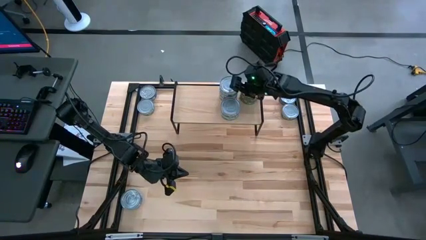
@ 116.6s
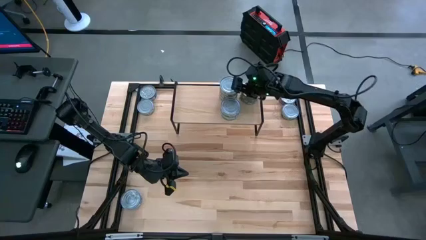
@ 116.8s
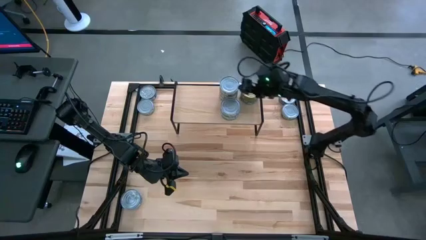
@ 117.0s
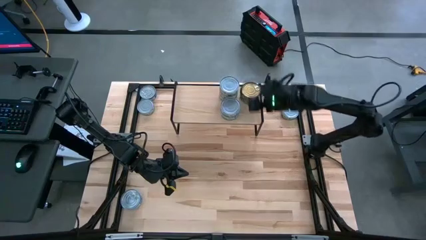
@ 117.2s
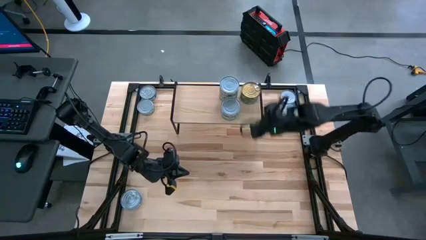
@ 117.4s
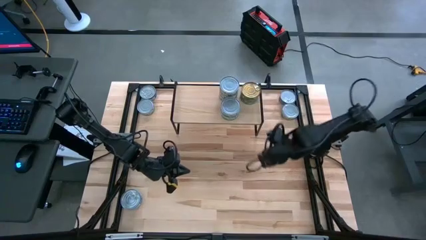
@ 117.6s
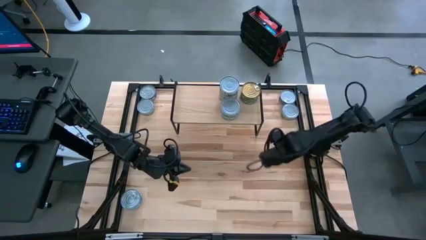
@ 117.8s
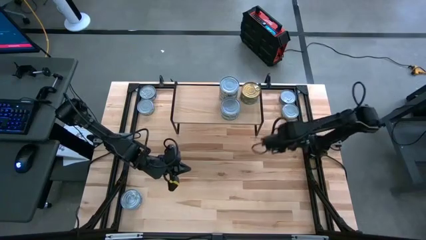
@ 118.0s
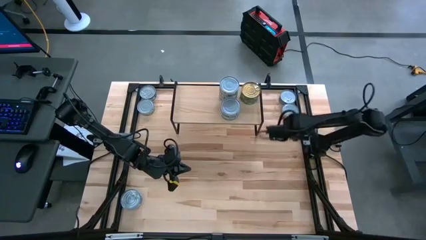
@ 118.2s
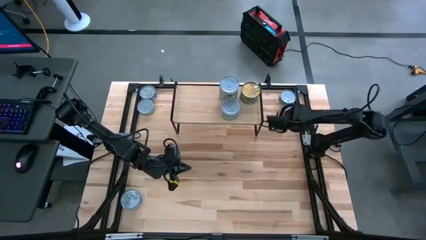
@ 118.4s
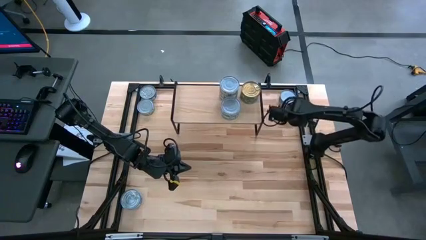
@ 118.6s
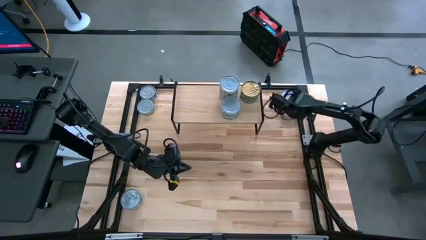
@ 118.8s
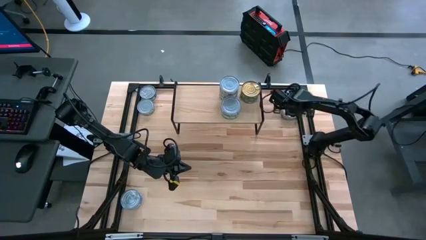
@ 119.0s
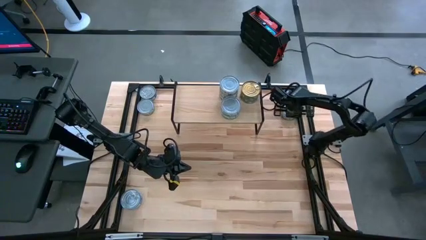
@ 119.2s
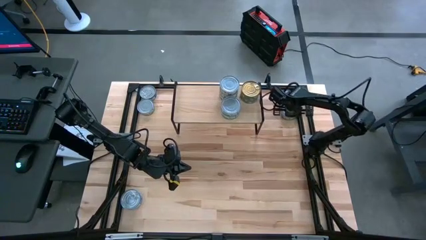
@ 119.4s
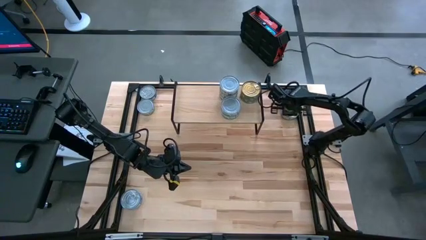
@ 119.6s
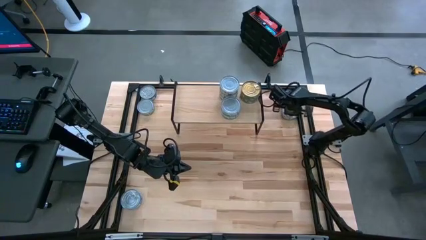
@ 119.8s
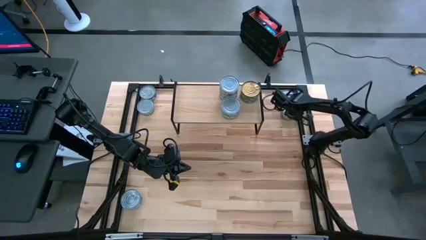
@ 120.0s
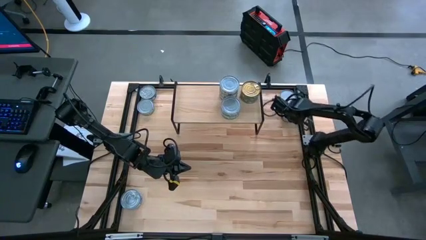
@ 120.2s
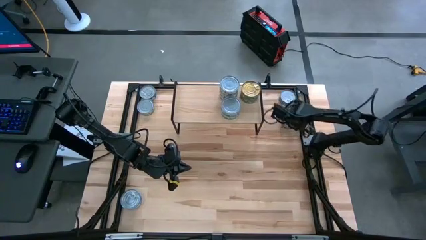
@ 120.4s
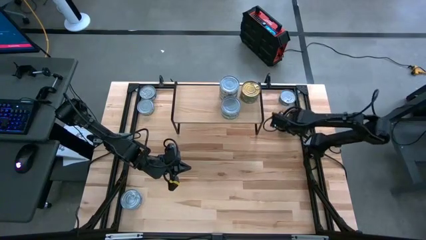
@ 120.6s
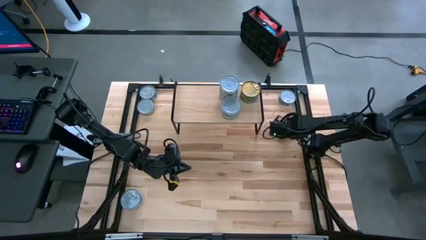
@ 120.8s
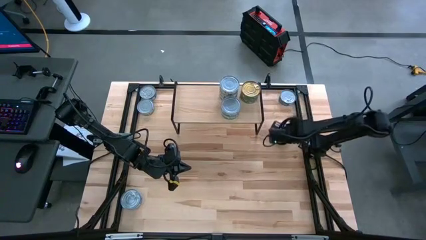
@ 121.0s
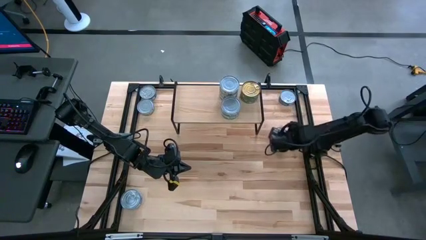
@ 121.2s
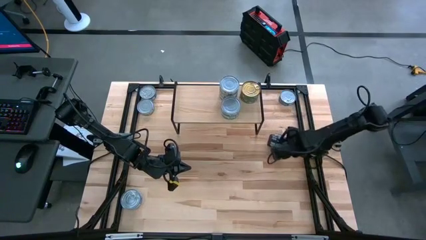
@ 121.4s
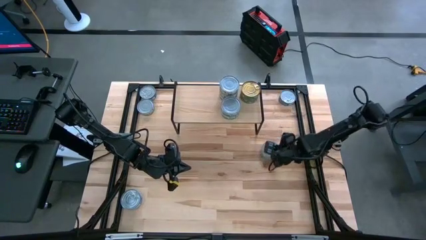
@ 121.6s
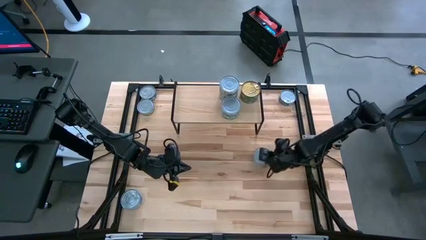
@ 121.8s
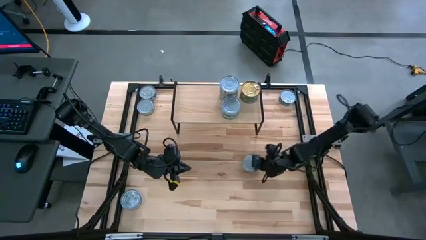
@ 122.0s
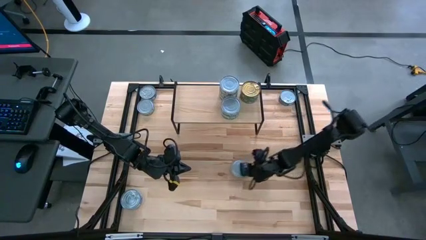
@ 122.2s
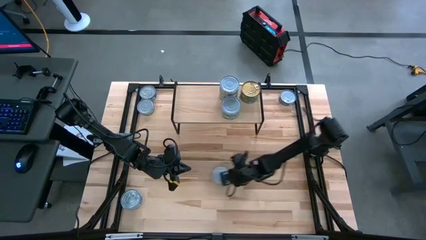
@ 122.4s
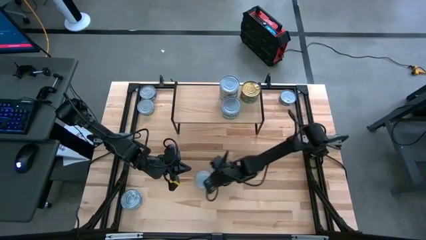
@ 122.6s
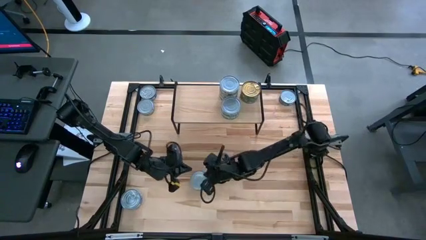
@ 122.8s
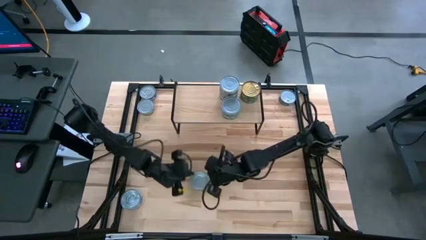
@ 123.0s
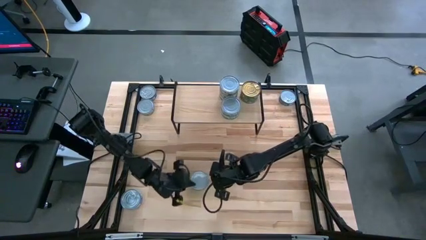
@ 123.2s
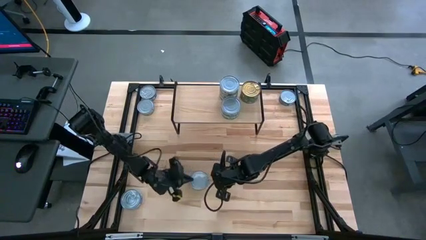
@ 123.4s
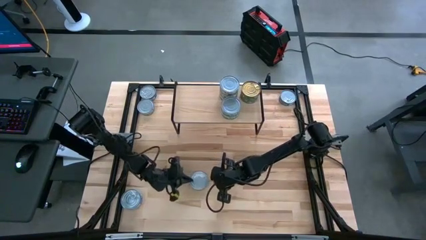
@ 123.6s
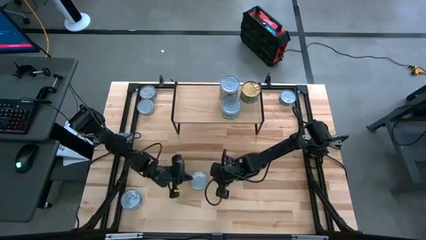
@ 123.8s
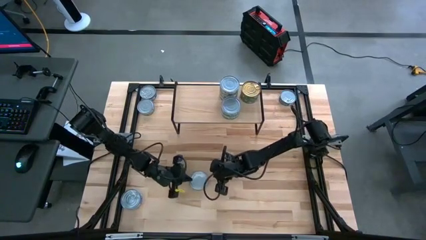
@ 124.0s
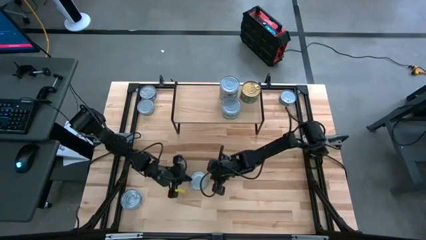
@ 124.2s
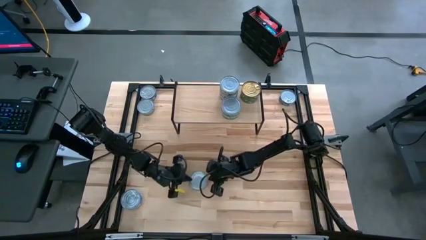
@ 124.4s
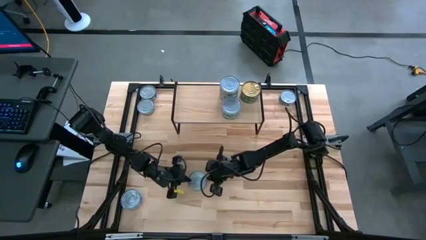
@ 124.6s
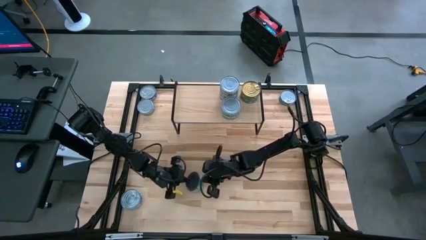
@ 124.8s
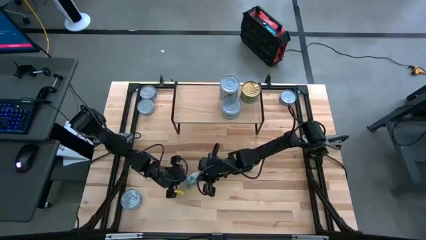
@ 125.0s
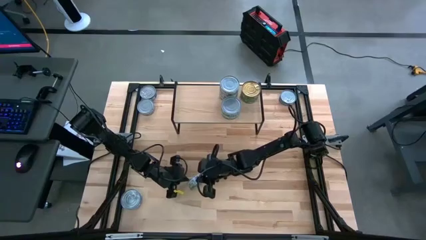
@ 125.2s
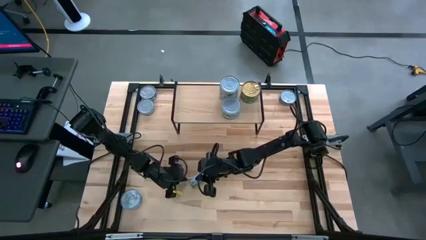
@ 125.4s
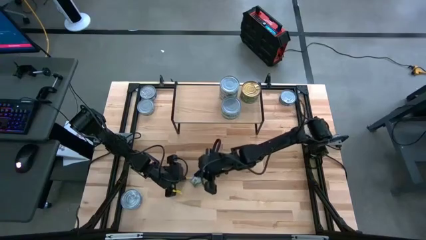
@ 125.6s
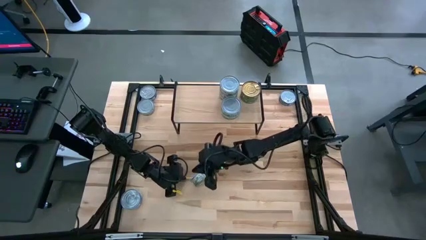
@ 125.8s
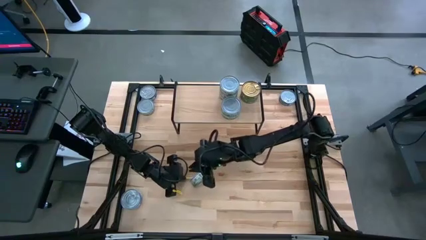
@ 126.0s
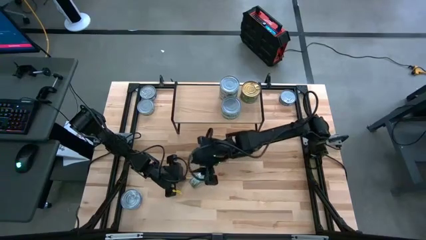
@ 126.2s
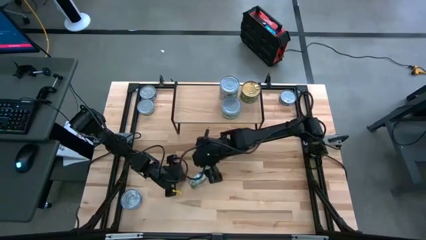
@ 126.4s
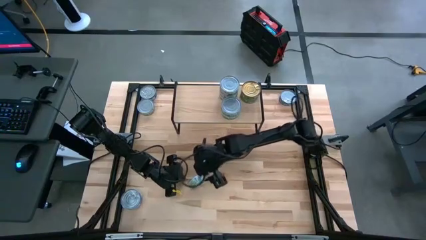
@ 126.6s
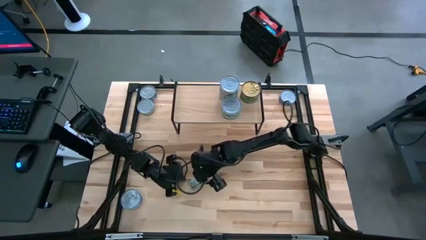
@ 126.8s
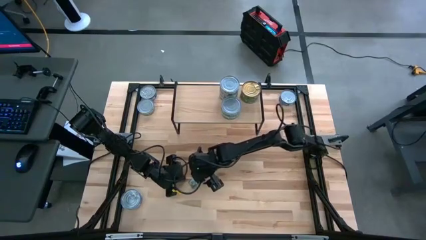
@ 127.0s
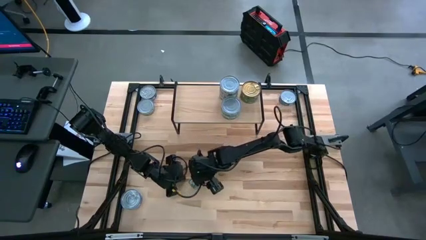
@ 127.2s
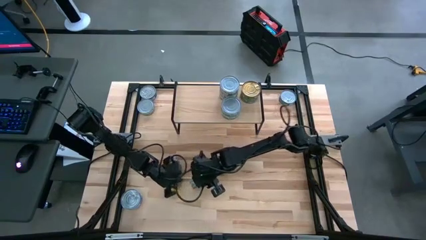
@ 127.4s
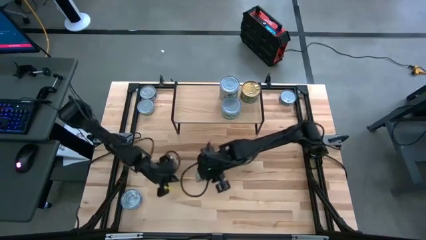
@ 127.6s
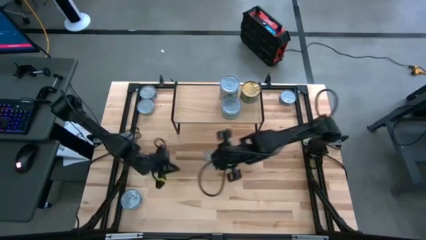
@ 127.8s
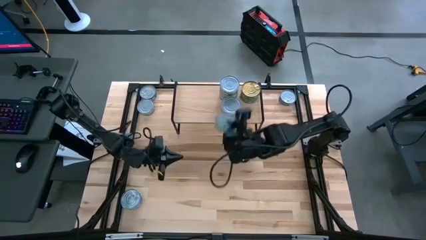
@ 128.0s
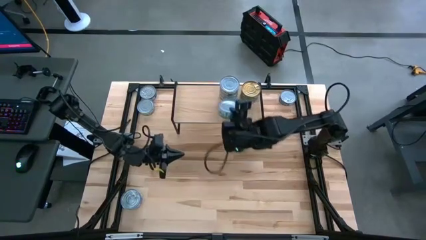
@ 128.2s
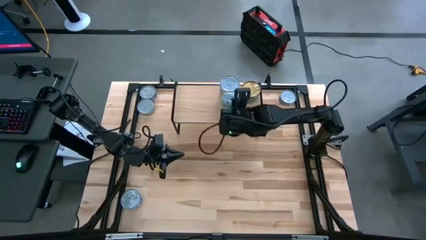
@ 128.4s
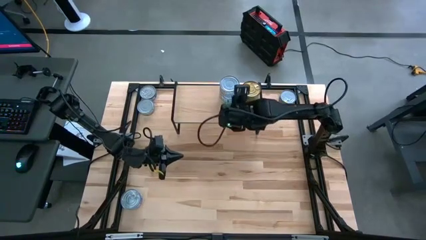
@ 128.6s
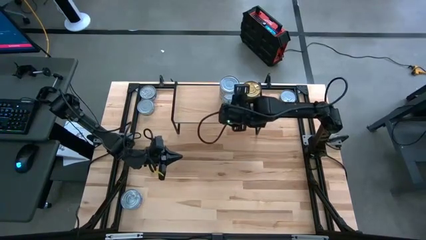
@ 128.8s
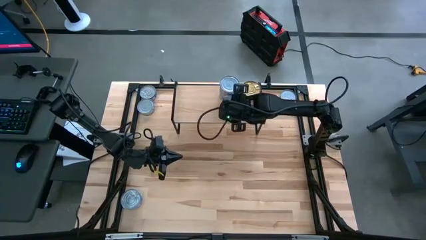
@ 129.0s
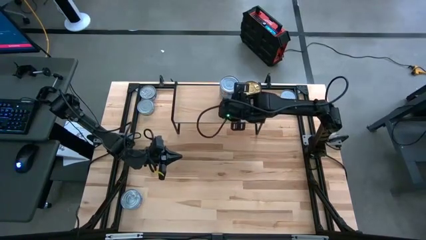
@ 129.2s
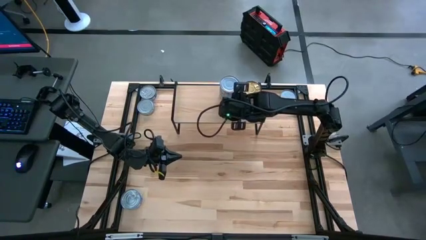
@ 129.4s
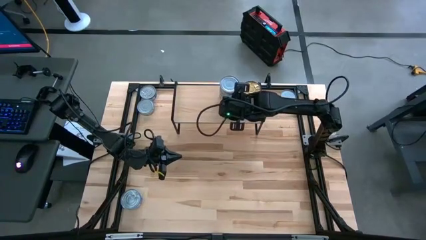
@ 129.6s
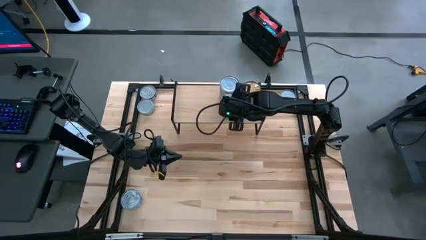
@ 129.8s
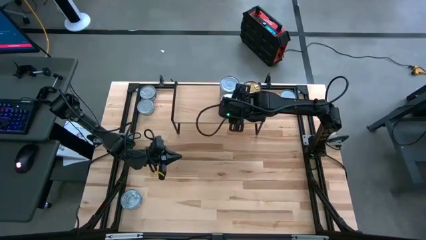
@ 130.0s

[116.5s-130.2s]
Task: Stack canned seafood by type on shelf
Stack the light green tuna can on top of the other light green tuna can on the shelf

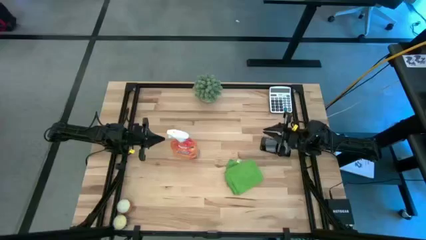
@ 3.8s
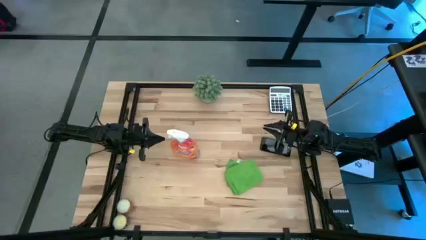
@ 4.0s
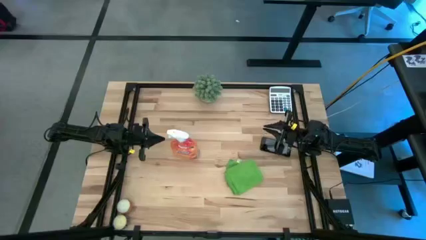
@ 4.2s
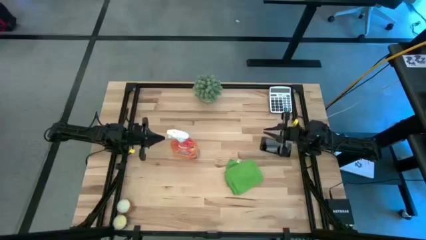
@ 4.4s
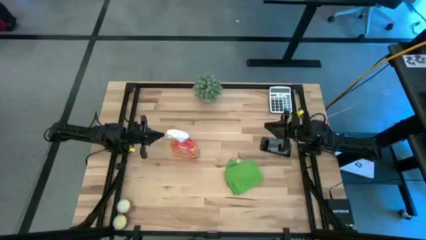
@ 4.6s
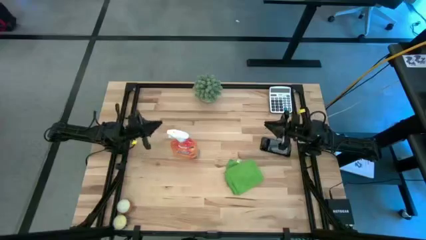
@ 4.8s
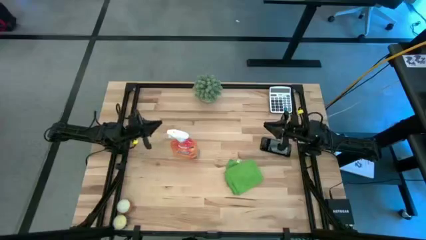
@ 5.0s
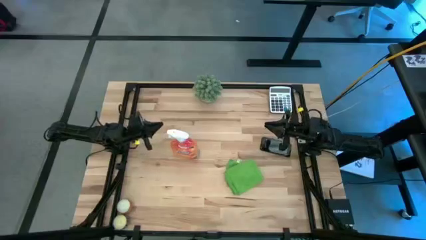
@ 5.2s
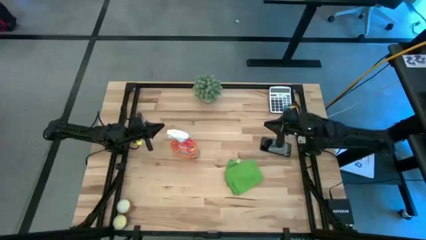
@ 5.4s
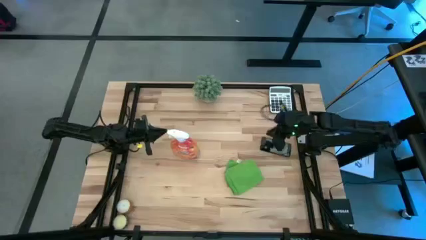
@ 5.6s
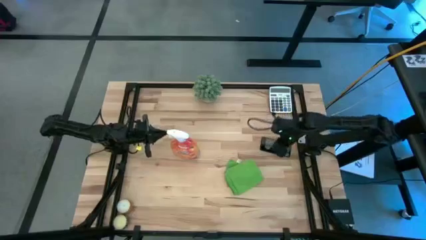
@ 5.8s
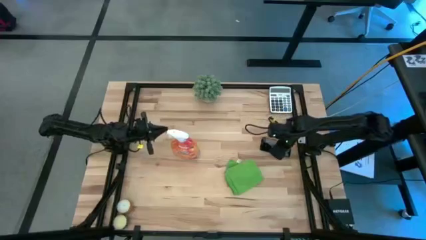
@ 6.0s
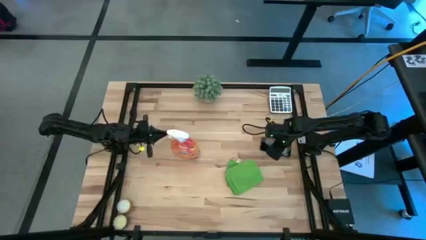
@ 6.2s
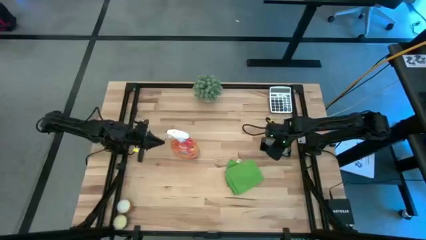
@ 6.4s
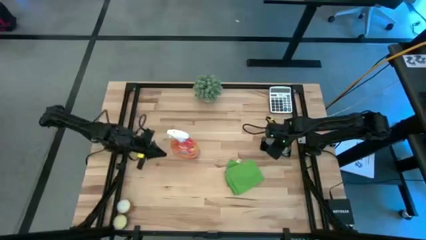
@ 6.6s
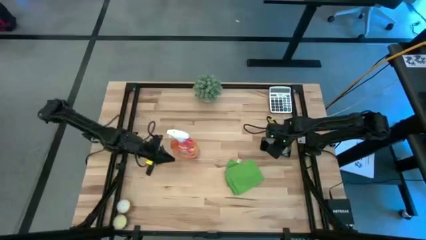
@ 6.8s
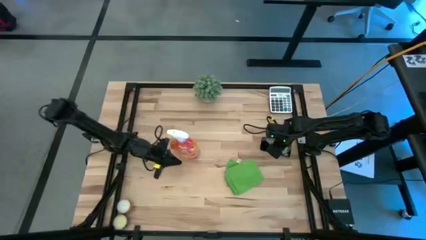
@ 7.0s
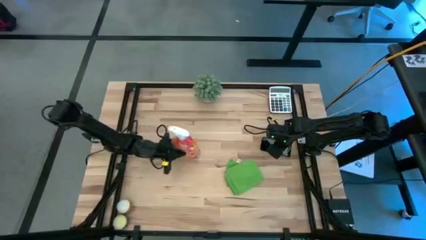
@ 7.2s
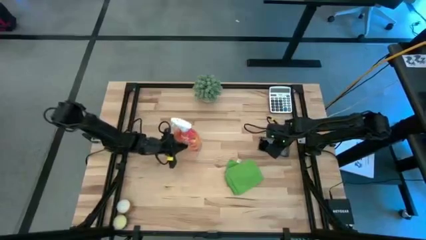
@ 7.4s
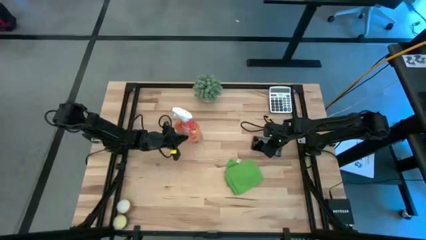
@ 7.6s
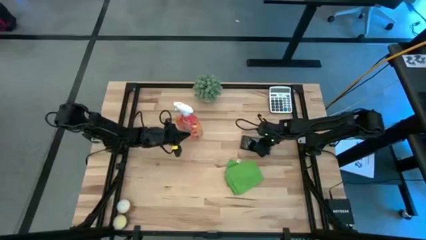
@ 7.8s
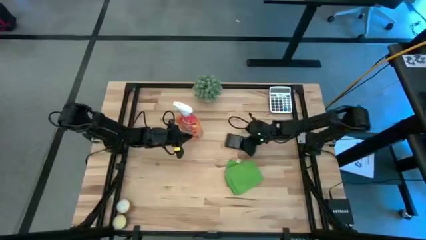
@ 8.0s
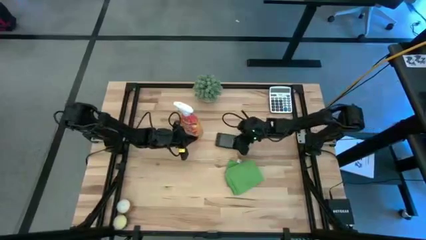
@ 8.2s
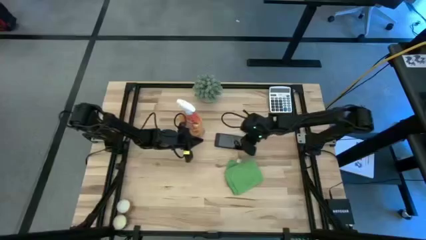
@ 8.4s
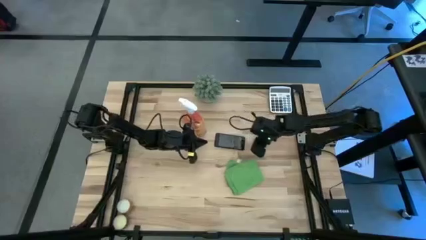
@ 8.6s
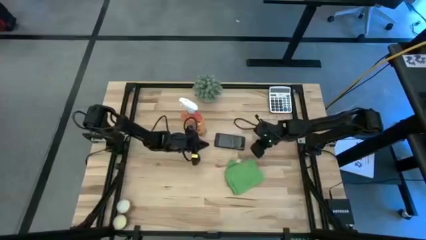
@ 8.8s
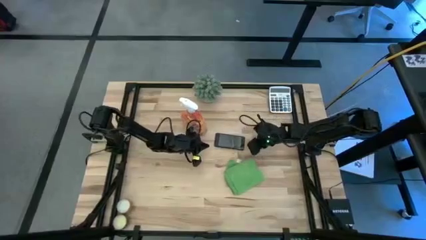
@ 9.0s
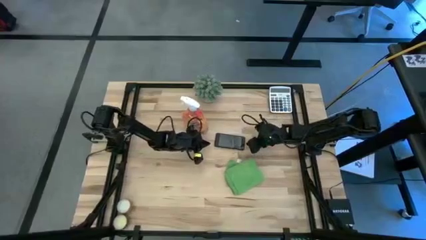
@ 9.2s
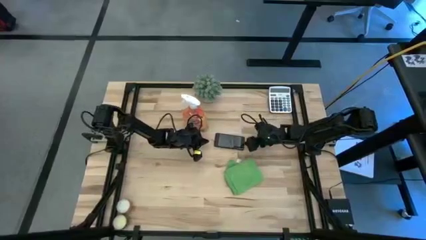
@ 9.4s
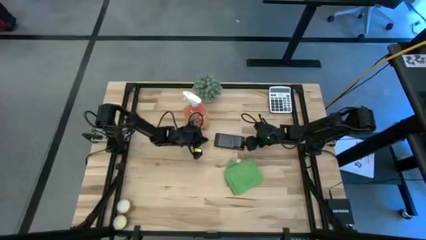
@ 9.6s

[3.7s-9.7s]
Task: Apply microfiber cloth
Move the orange spray cleaning bottle to the top center of the table
